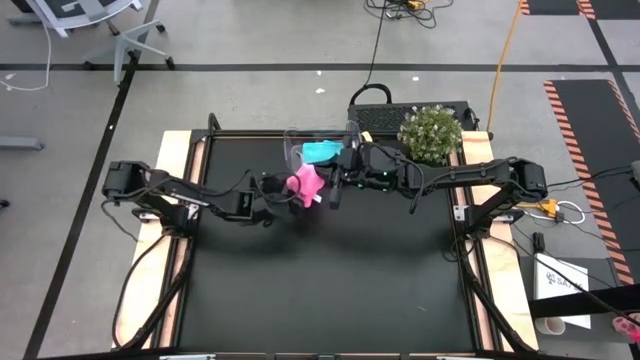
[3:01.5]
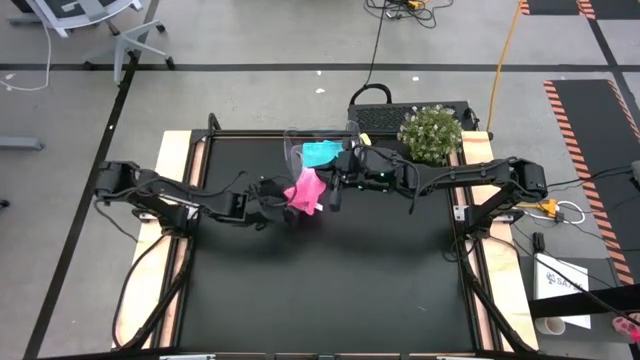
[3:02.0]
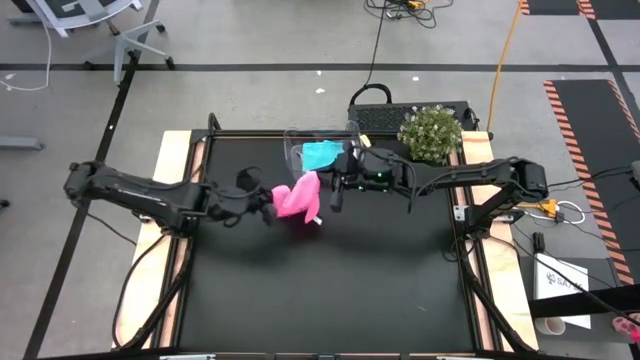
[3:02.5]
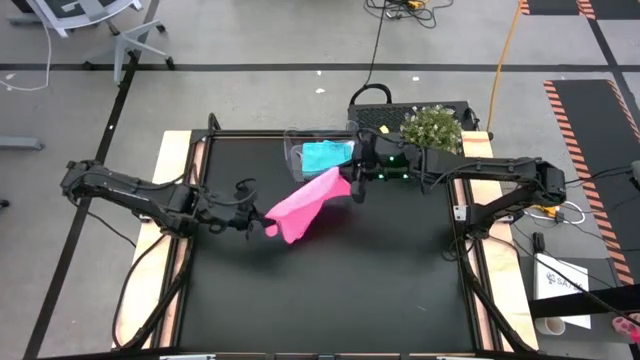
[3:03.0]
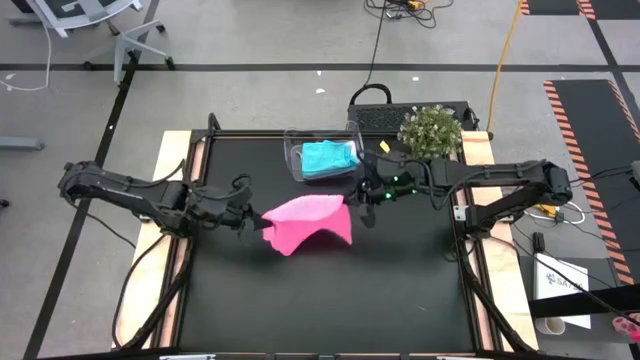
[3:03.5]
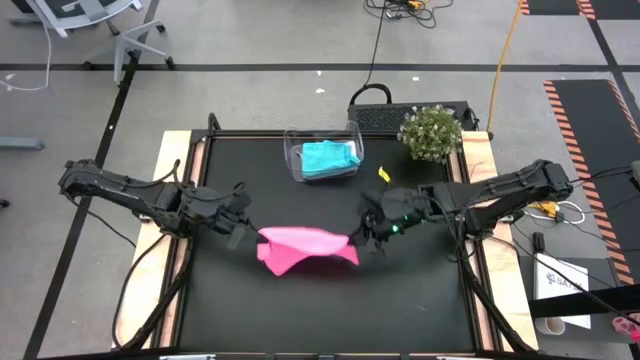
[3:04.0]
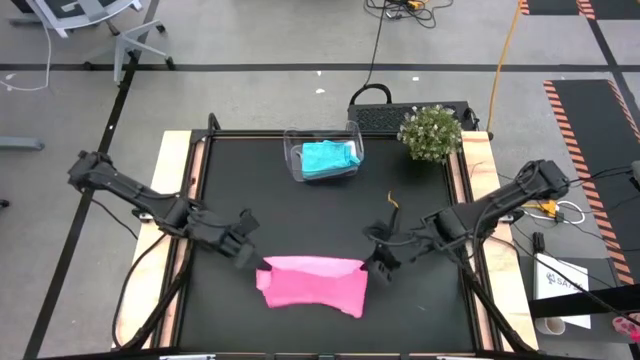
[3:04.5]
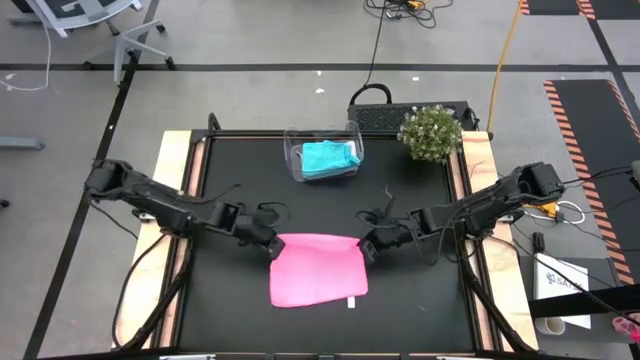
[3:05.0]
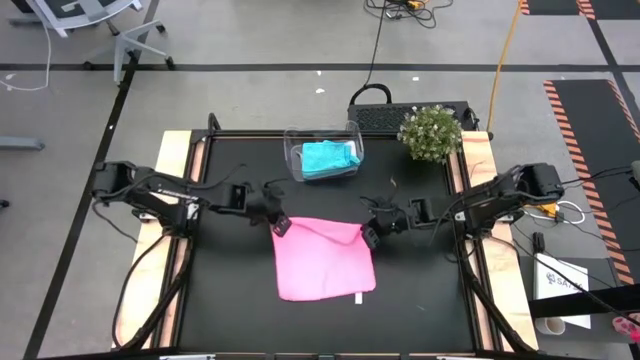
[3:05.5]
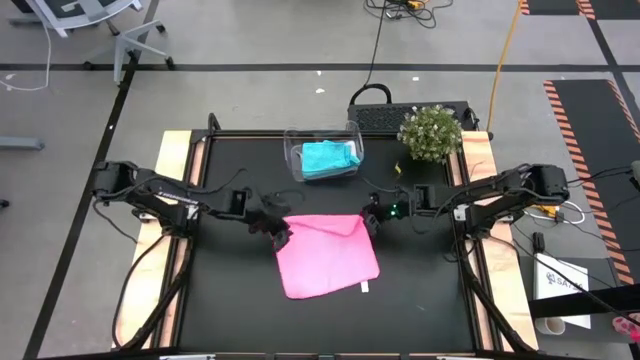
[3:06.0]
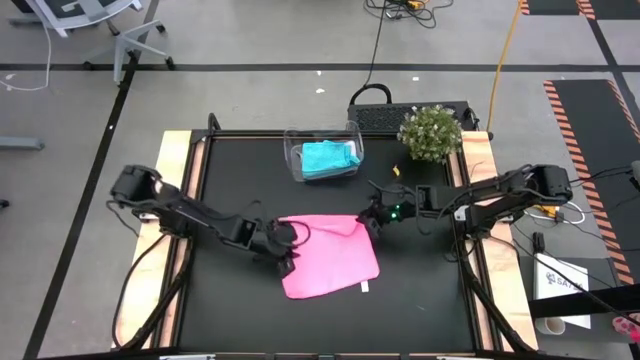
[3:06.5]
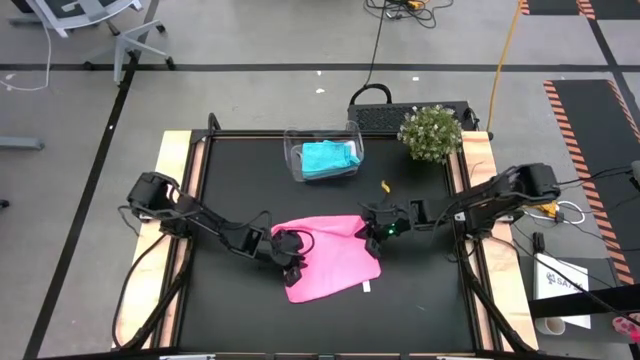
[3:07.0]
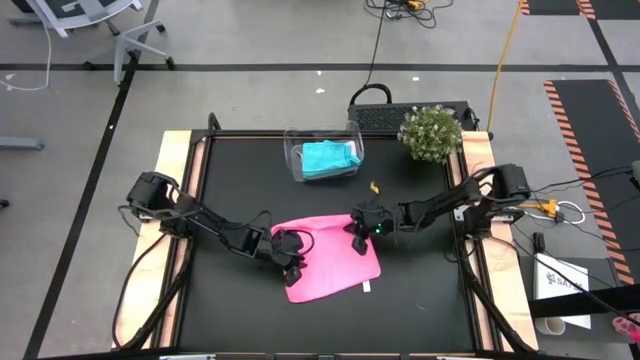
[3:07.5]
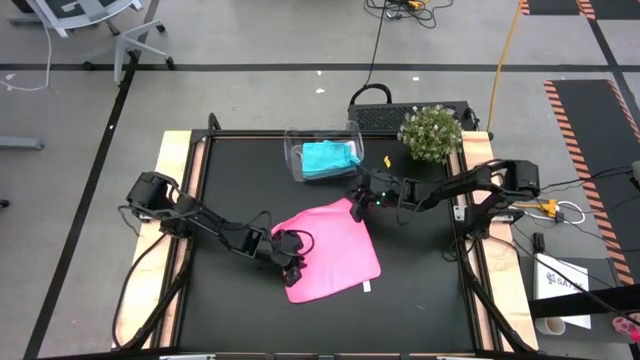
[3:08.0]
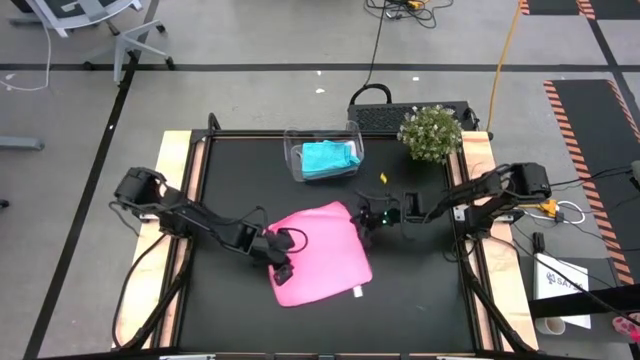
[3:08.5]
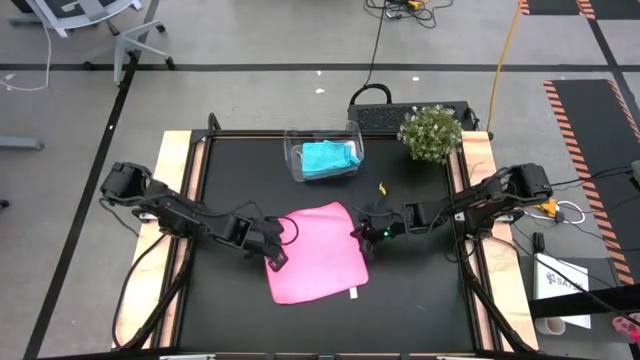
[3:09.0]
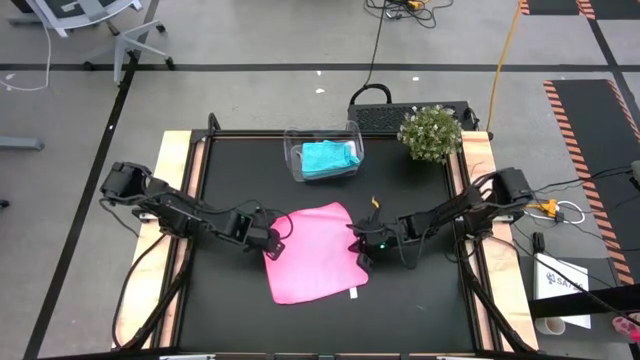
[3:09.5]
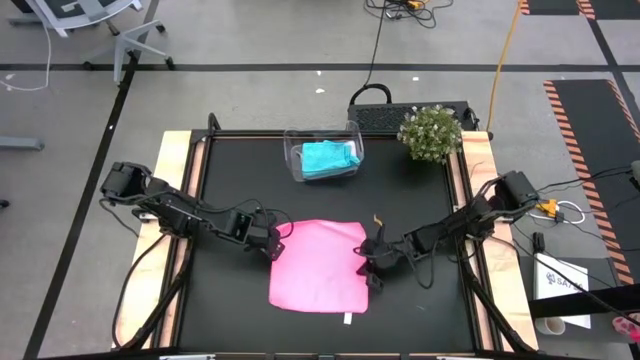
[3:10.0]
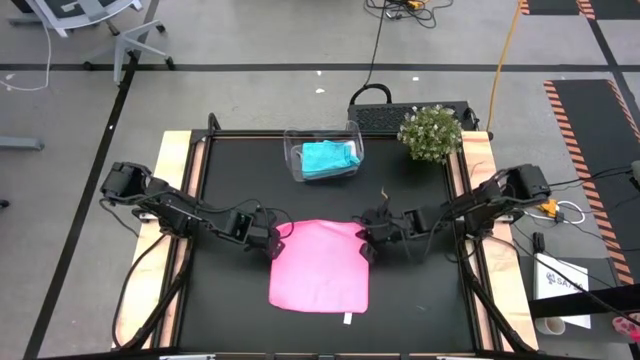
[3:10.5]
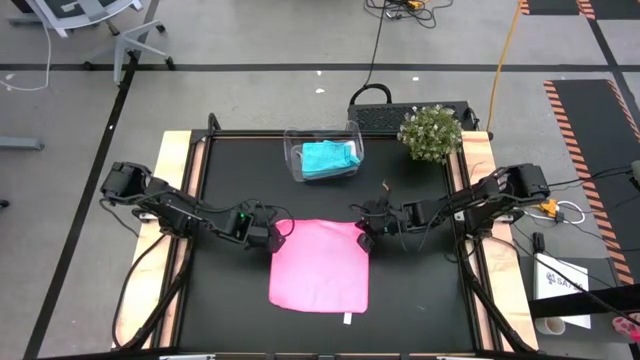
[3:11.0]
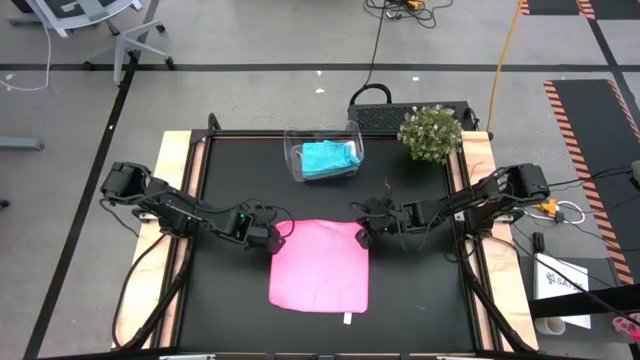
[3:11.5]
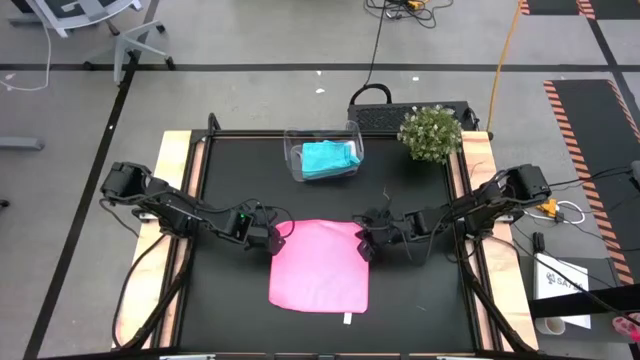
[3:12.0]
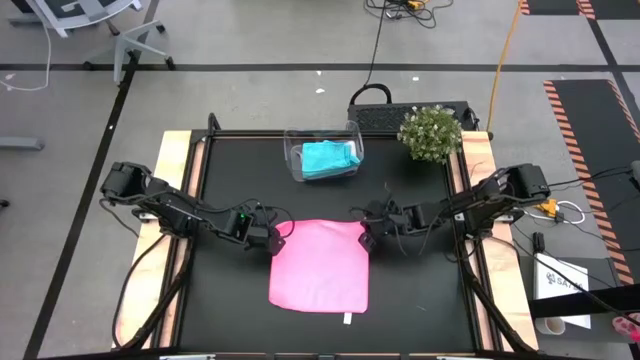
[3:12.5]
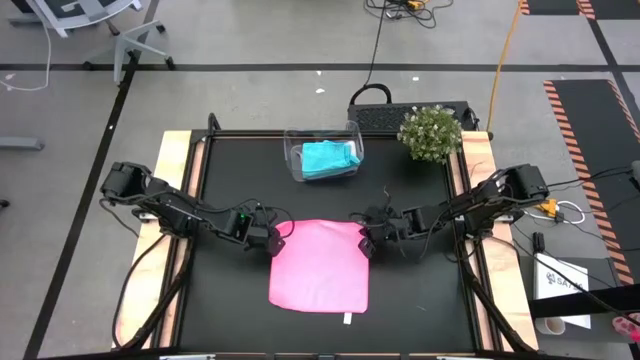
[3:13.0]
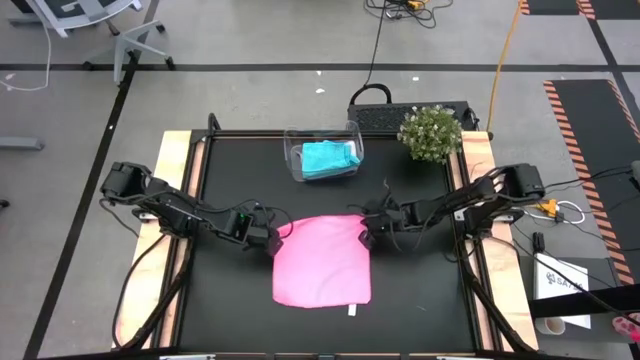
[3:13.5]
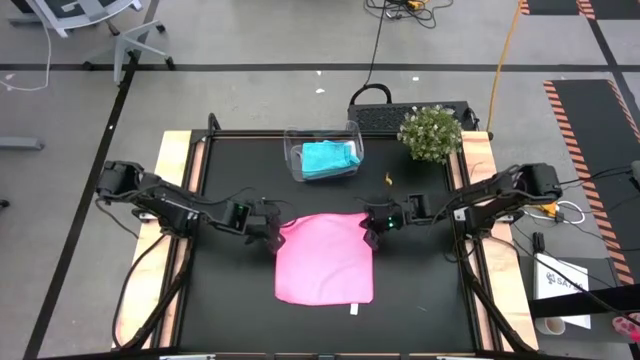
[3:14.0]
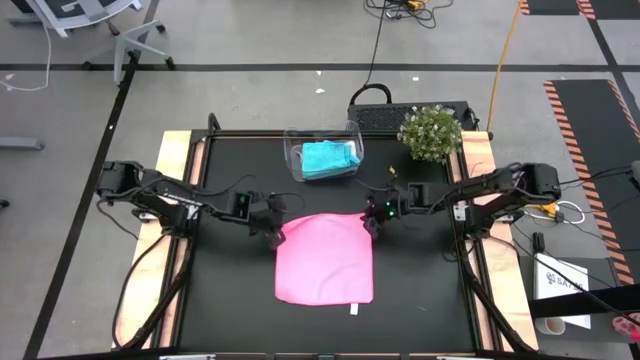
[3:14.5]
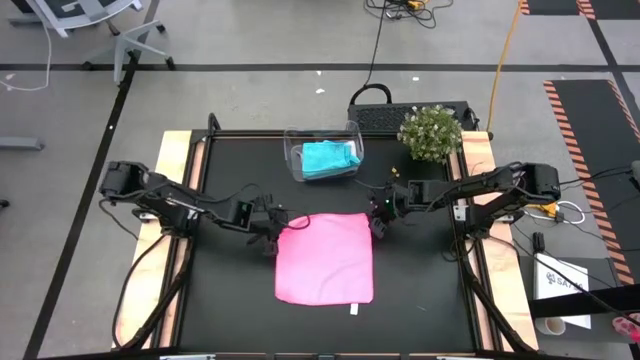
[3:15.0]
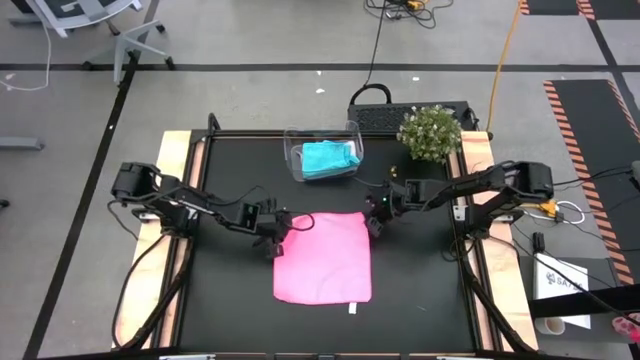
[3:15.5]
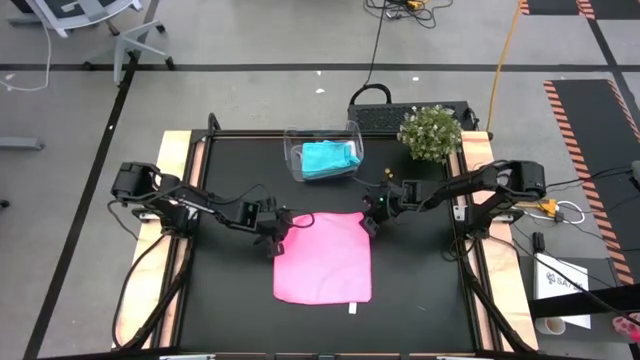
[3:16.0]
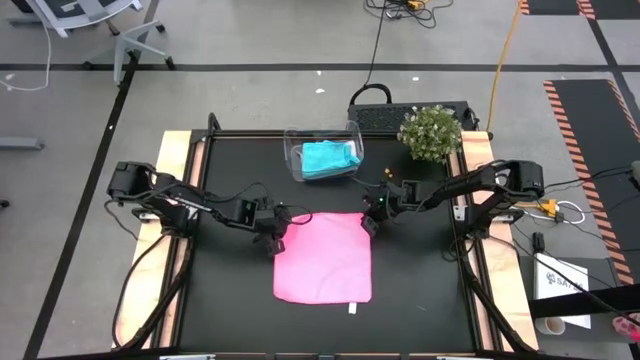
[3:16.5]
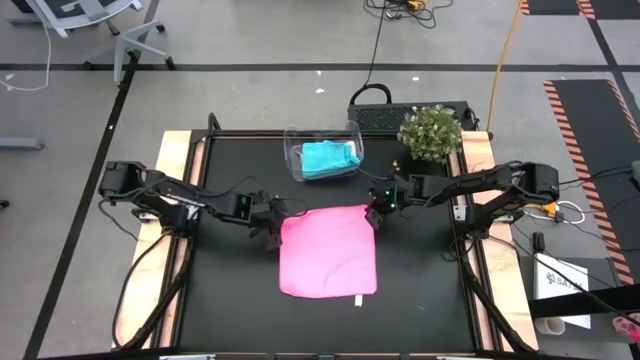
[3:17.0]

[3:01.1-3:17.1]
Task: Fold microfiber towels
Fold the pink microfiber cloth
